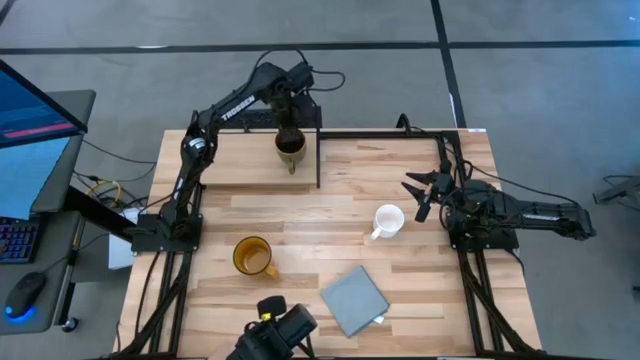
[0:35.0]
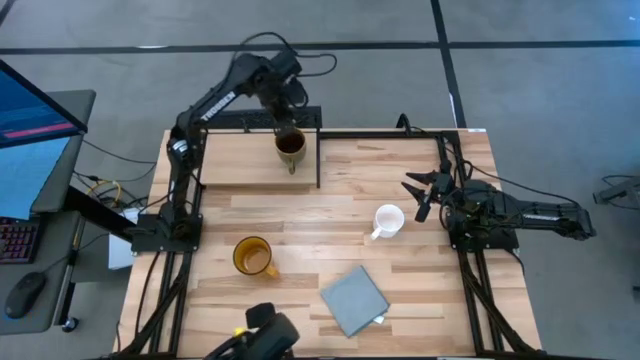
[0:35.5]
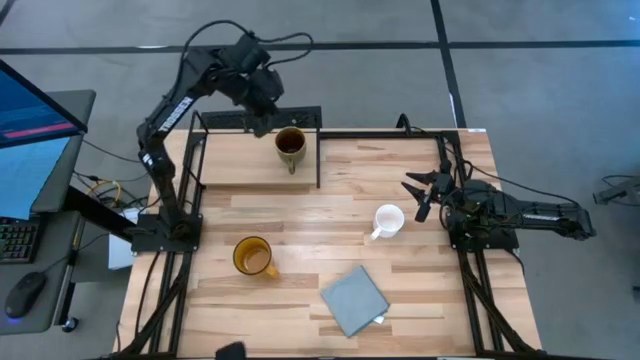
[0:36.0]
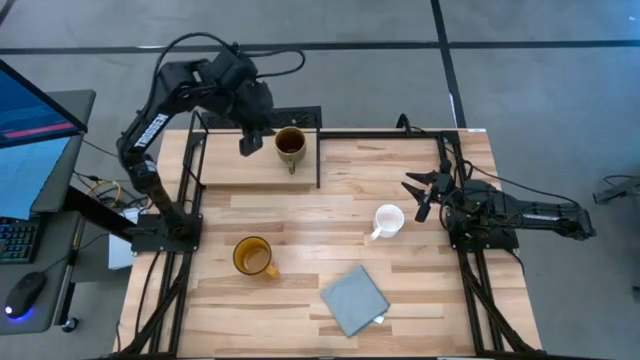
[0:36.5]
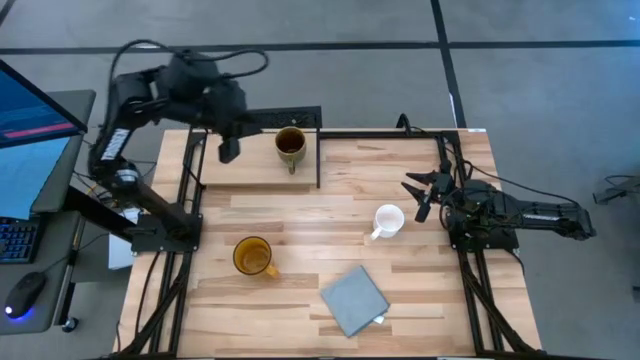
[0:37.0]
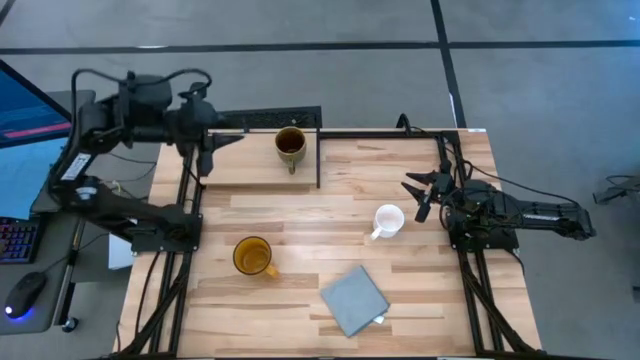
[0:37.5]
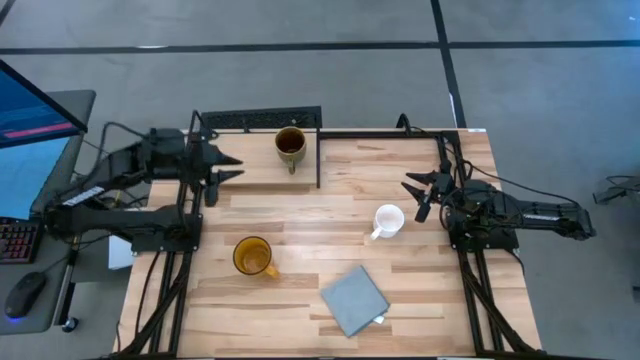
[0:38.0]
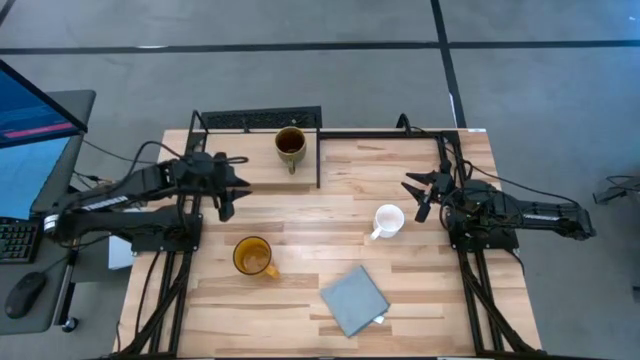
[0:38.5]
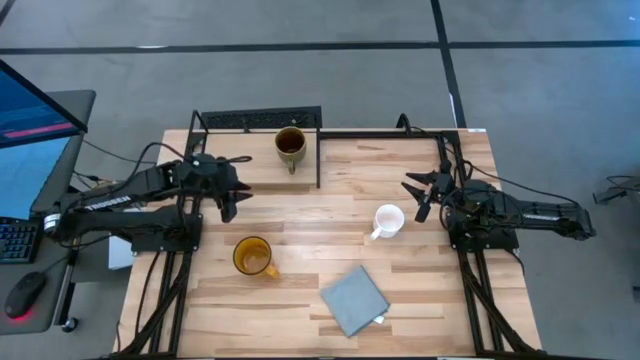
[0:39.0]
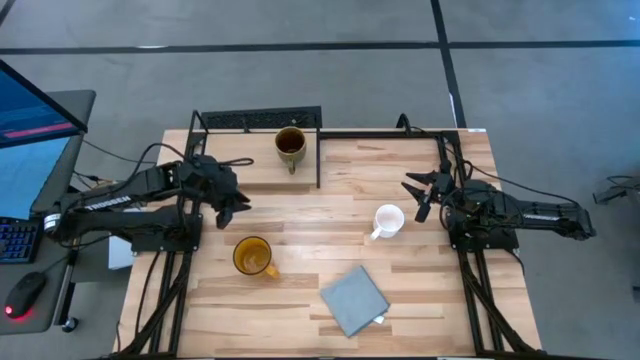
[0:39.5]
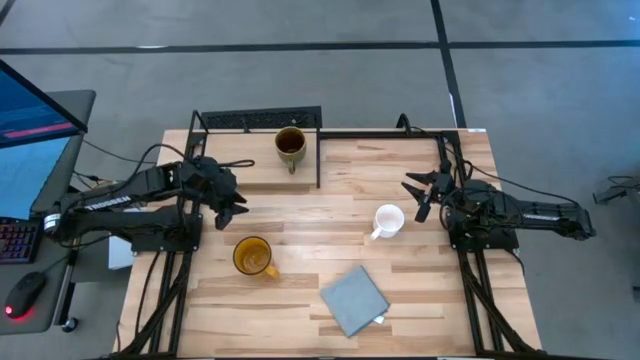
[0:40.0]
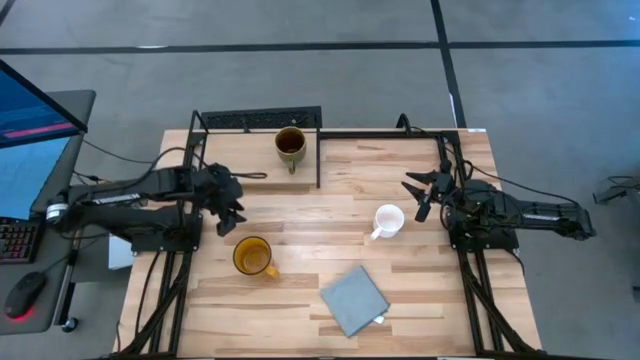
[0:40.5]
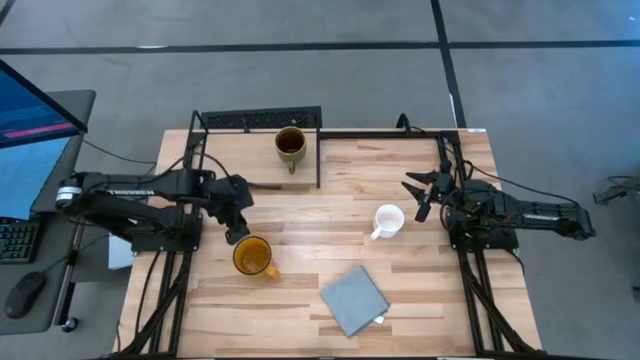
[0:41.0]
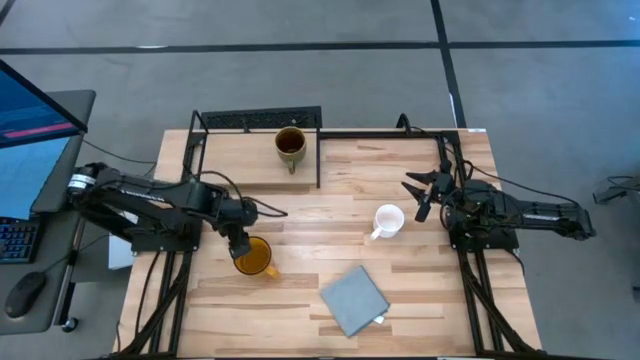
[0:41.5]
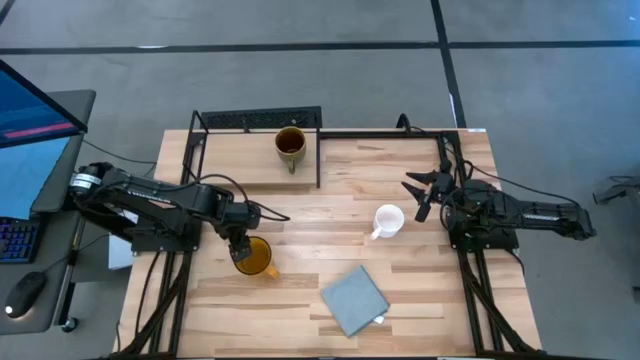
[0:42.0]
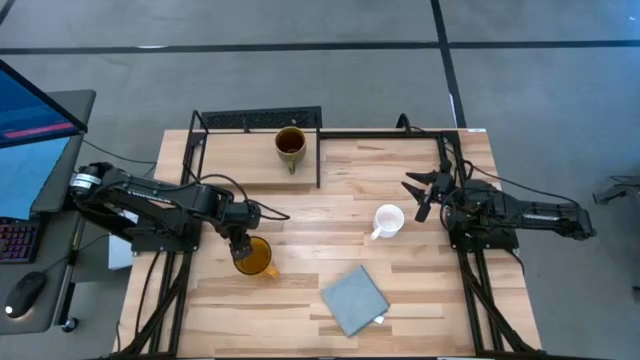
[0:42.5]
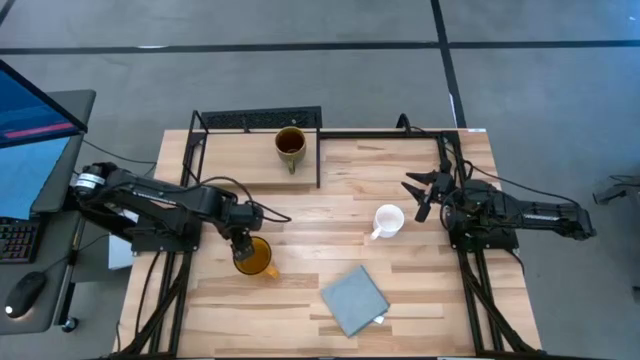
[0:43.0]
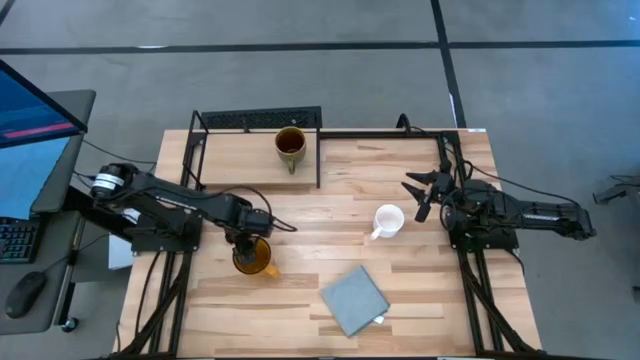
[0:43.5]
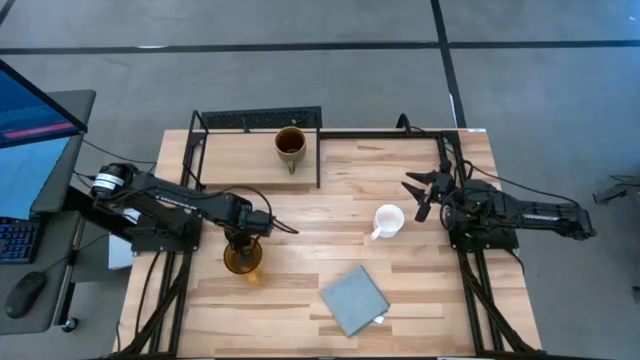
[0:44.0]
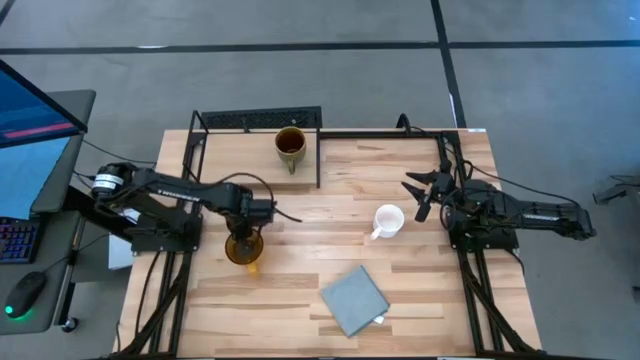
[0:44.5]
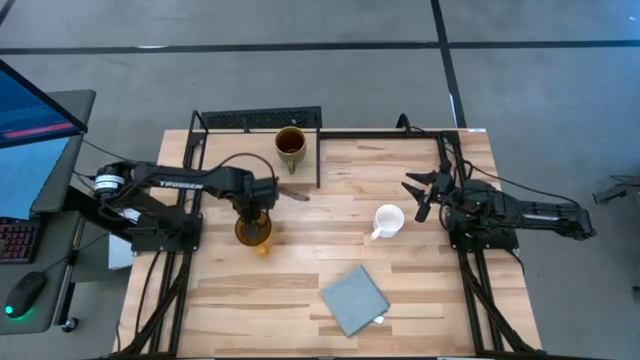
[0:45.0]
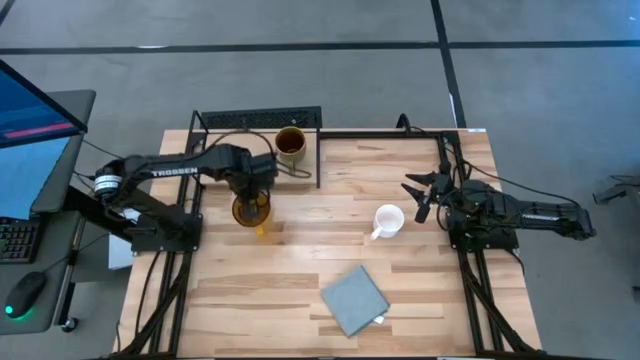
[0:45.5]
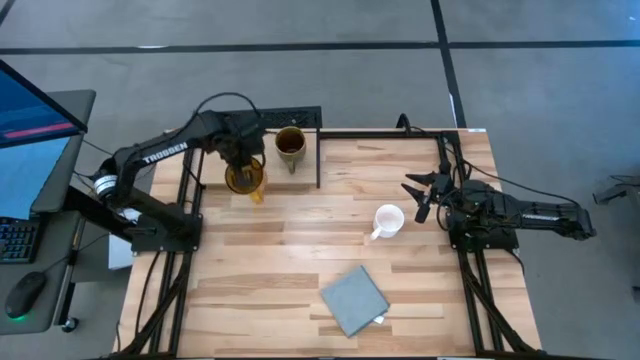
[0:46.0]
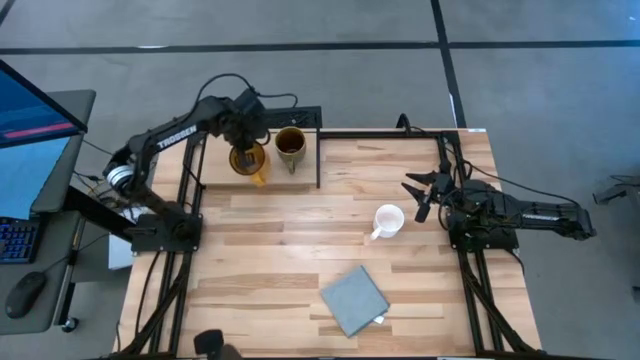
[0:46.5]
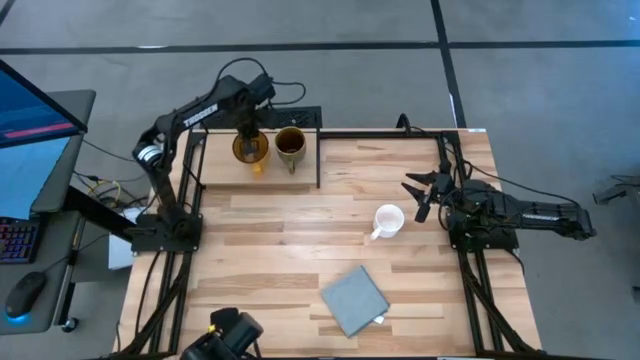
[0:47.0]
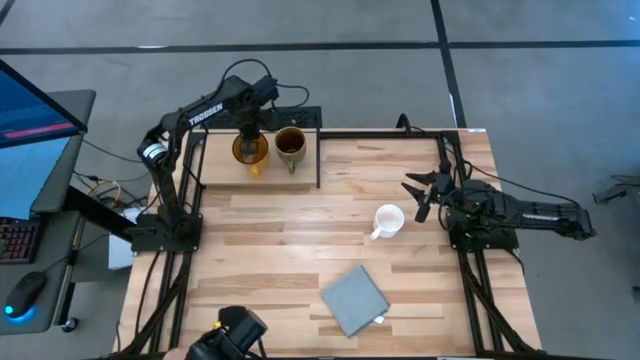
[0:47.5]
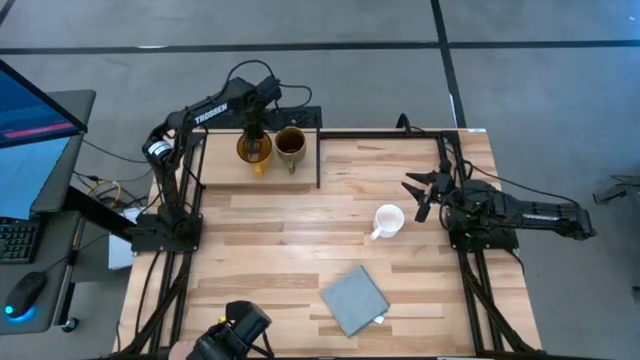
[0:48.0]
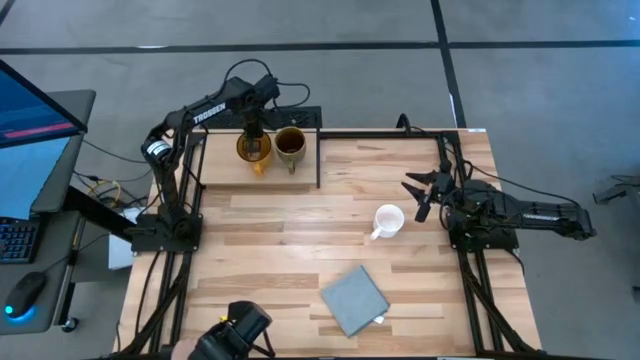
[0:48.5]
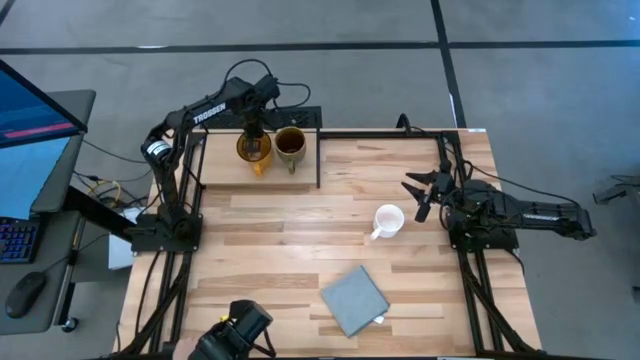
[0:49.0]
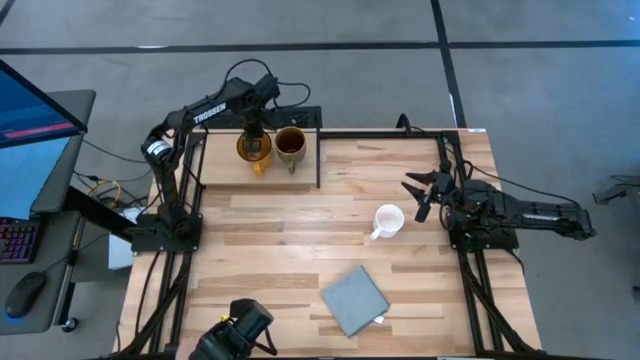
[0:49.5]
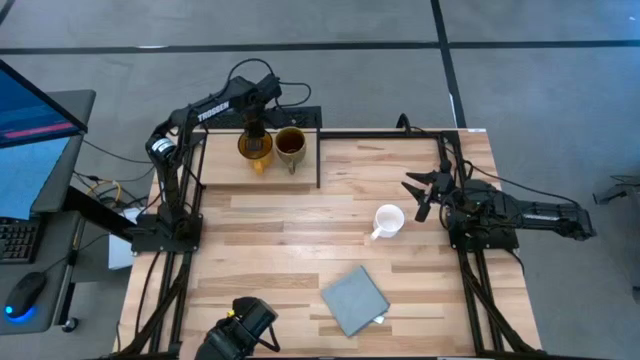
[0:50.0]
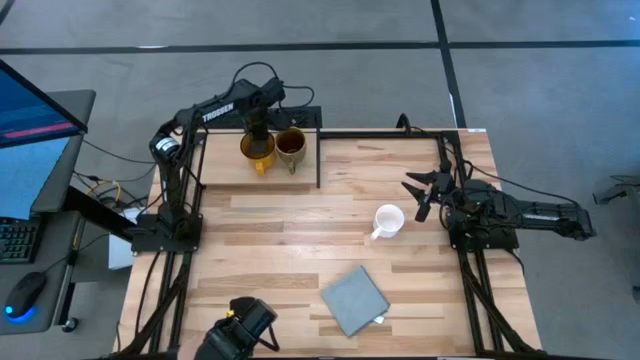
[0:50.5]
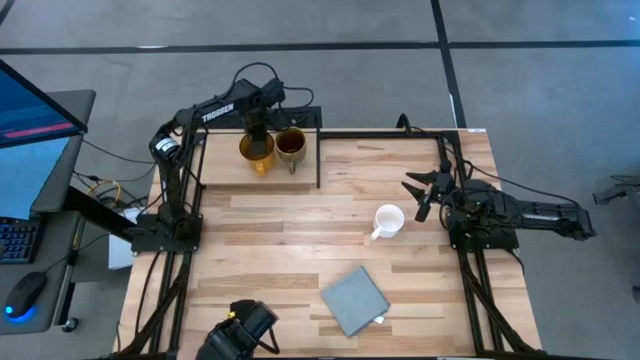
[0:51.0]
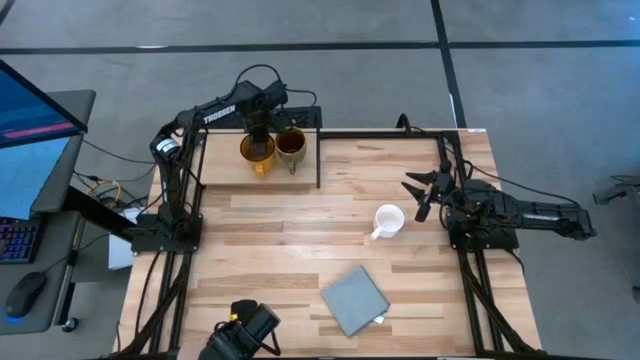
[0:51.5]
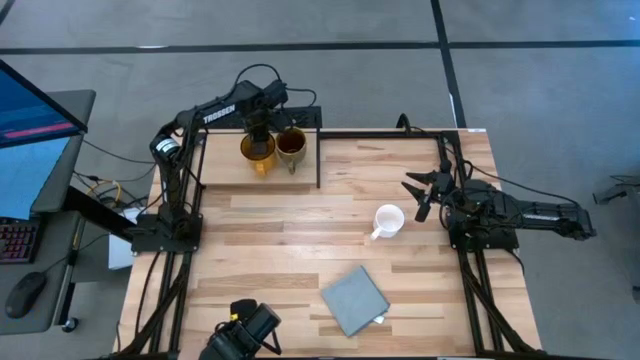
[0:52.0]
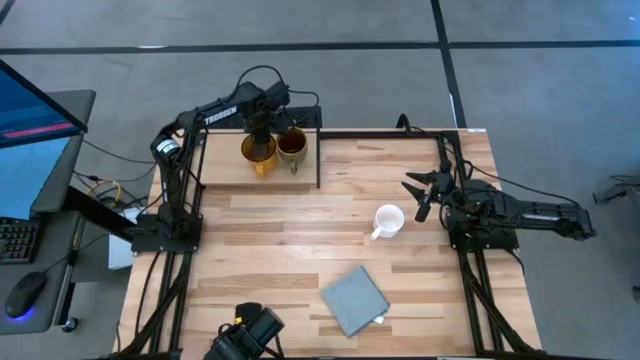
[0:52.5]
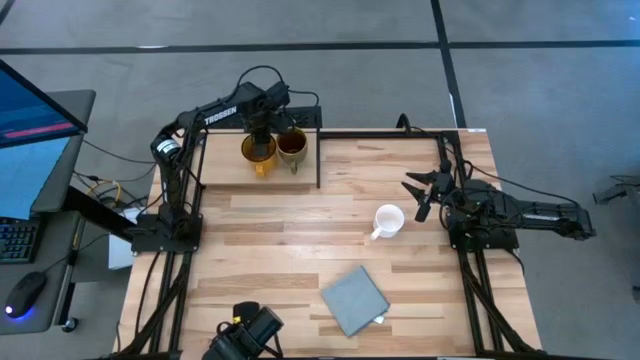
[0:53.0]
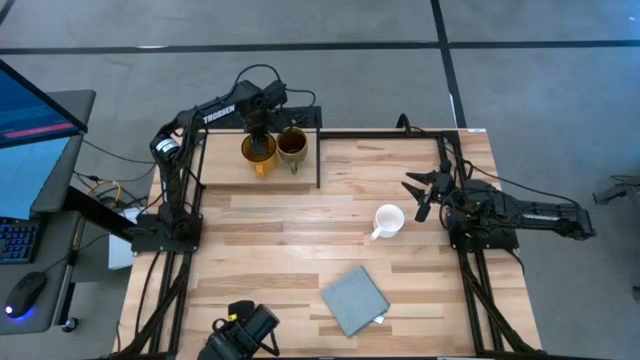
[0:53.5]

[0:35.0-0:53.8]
Task: Stack small to large cups/mugs on shelf
Put the yellow mug on the shelf

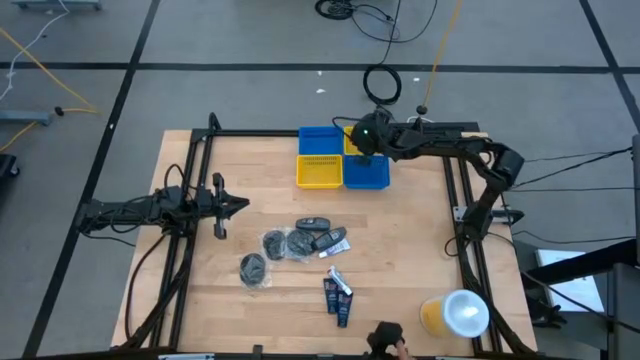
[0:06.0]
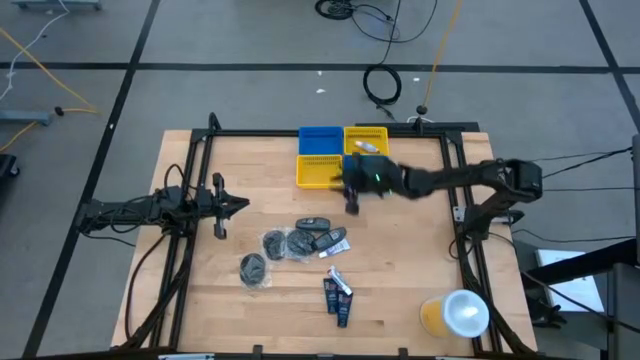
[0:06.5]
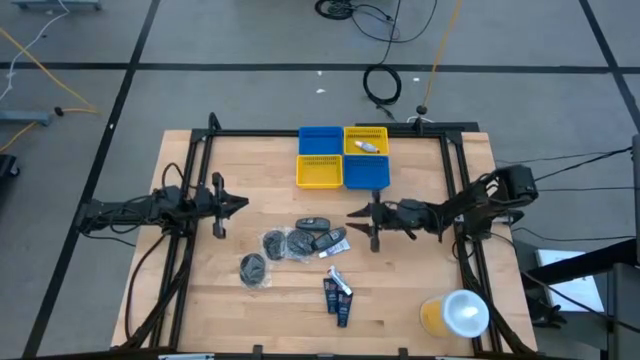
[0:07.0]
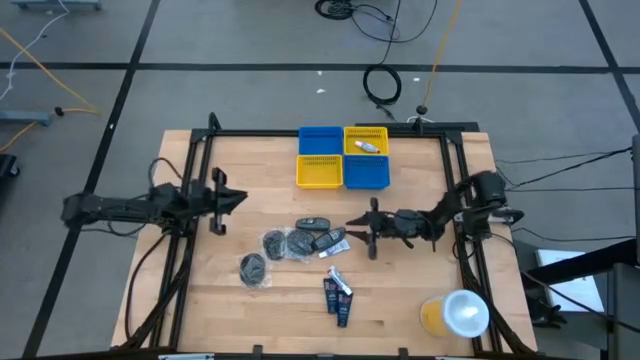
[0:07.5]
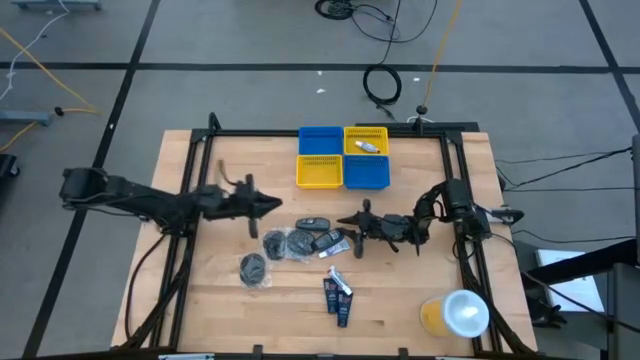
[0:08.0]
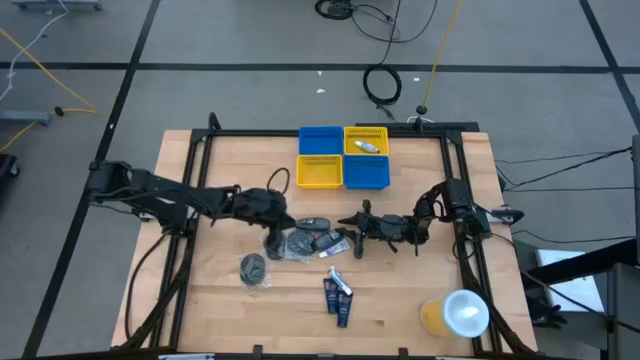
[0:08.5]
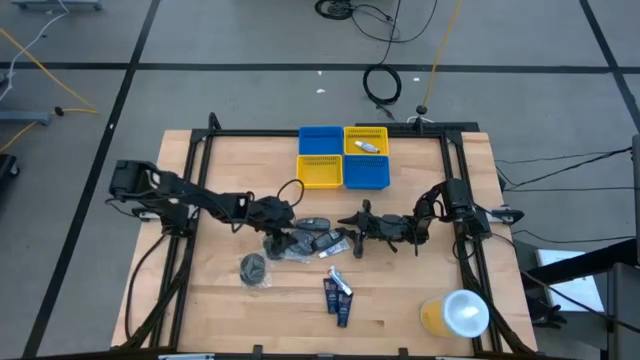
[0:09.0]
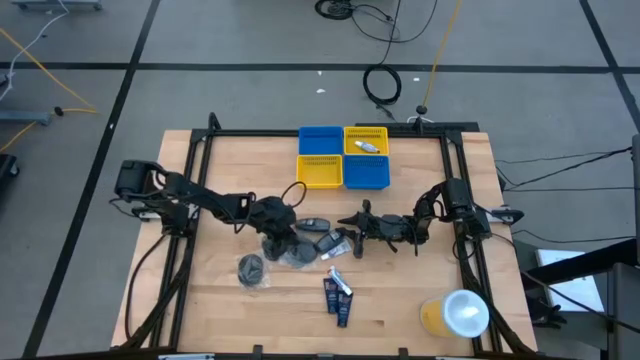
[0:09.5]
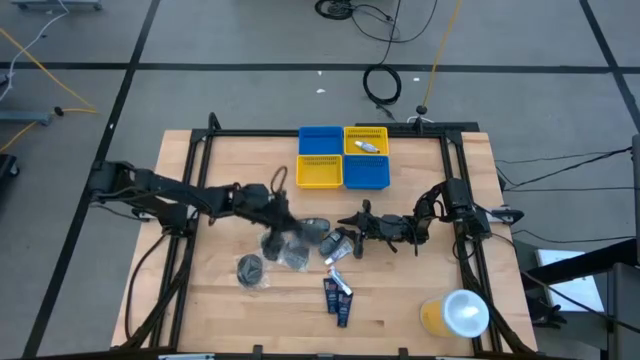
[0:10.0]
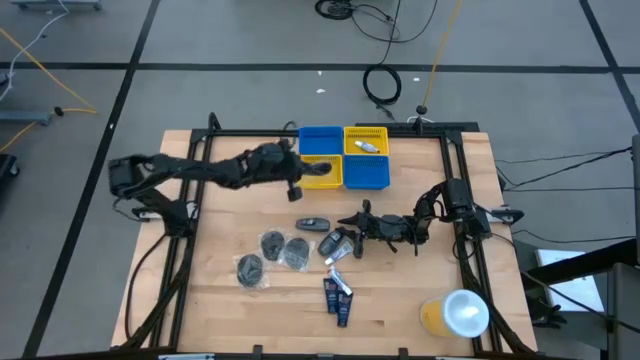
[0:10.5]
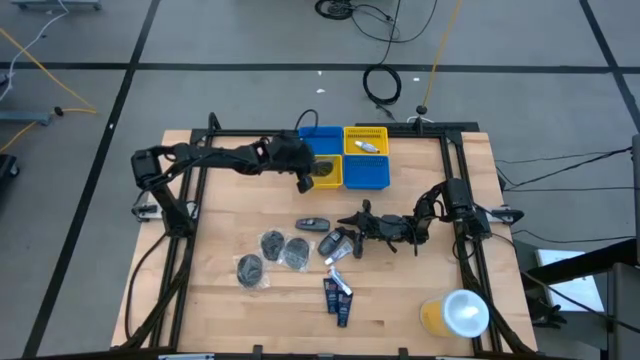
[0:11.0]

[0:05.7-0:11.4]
Task: Pick & Place Travel size toiletries
Put the black hairbrush into the left yellow bin
